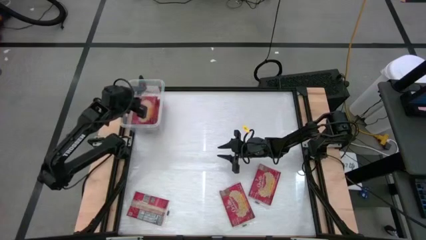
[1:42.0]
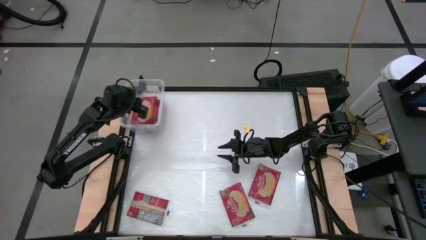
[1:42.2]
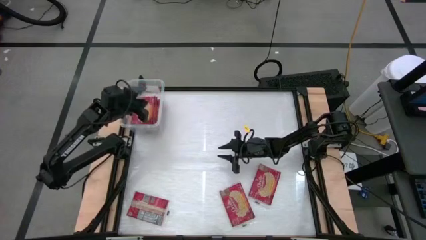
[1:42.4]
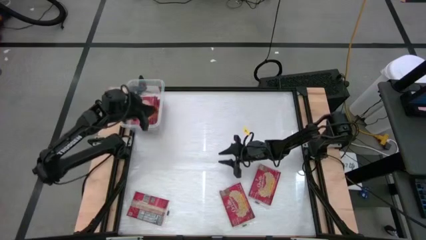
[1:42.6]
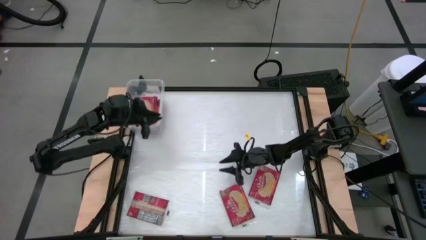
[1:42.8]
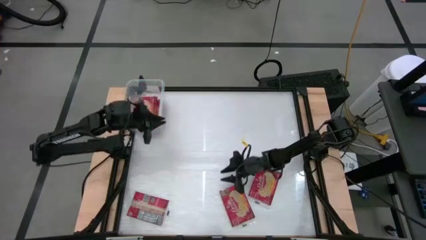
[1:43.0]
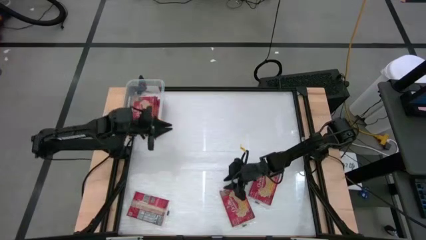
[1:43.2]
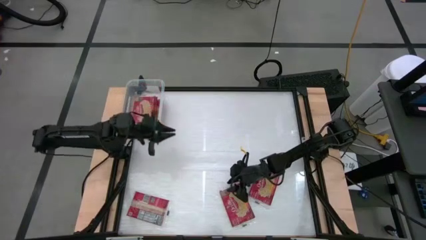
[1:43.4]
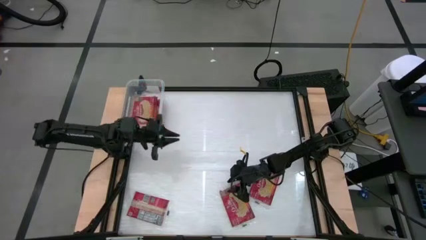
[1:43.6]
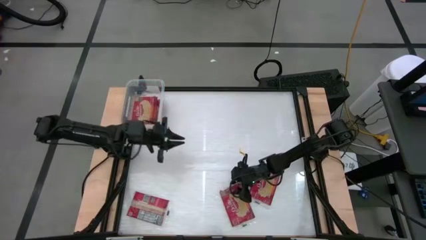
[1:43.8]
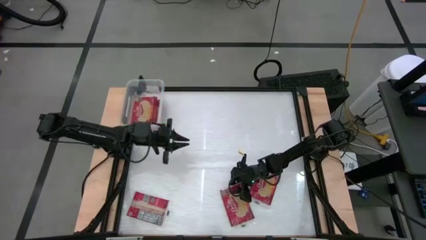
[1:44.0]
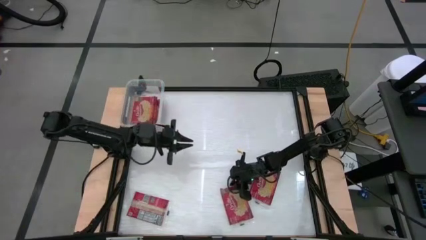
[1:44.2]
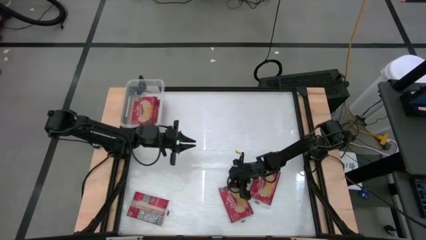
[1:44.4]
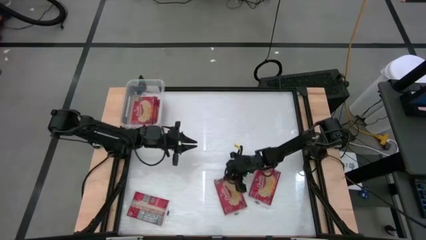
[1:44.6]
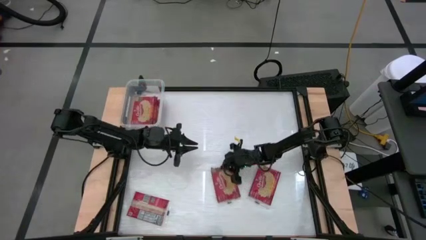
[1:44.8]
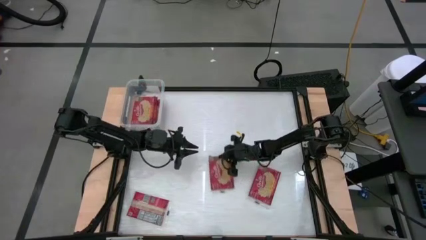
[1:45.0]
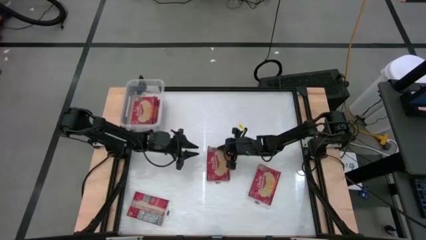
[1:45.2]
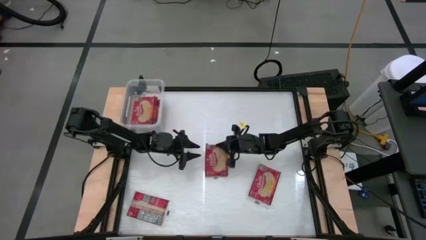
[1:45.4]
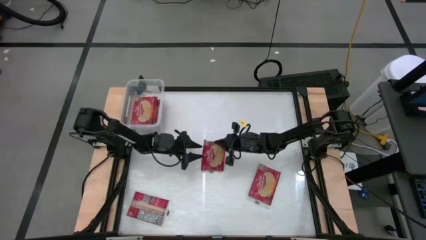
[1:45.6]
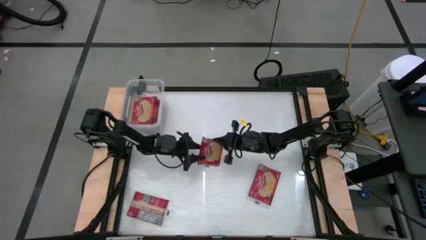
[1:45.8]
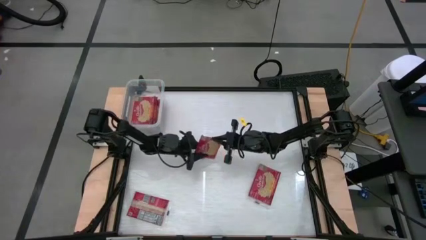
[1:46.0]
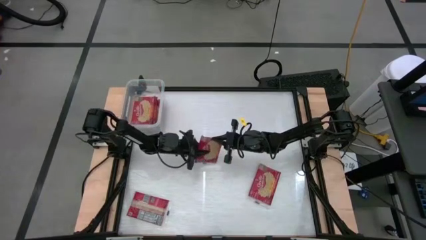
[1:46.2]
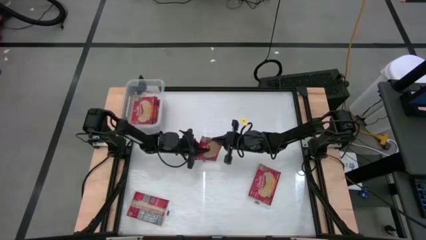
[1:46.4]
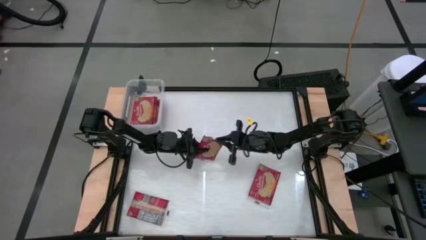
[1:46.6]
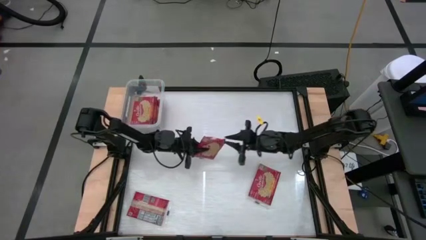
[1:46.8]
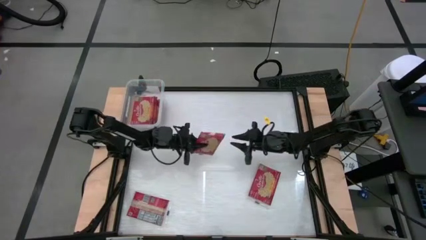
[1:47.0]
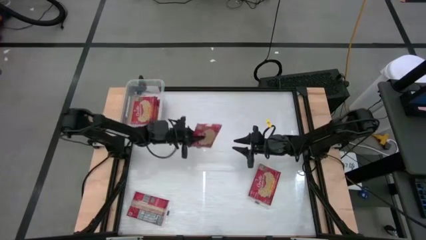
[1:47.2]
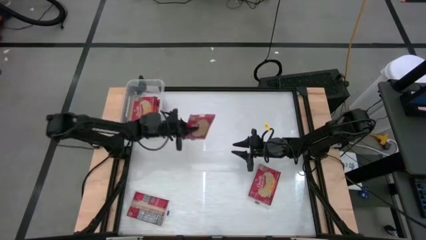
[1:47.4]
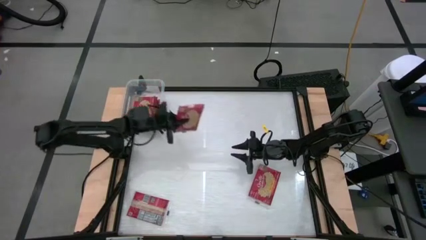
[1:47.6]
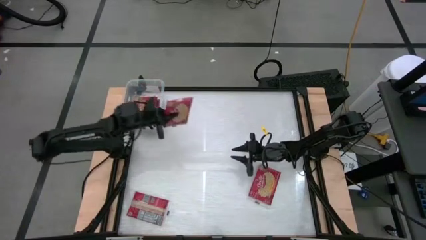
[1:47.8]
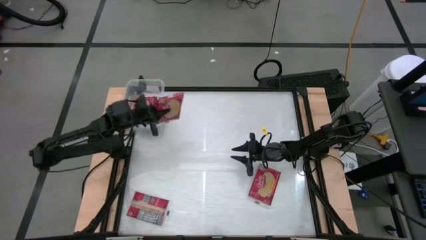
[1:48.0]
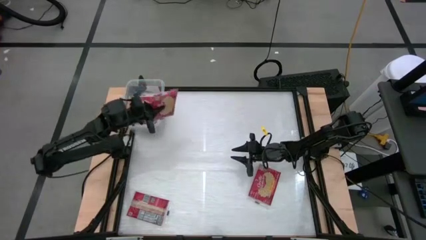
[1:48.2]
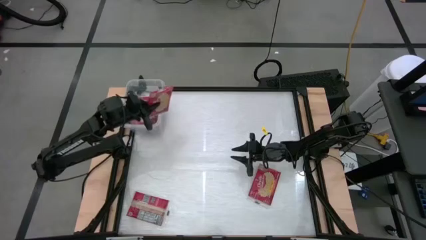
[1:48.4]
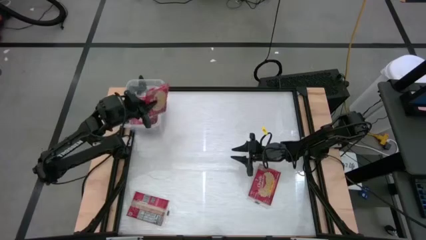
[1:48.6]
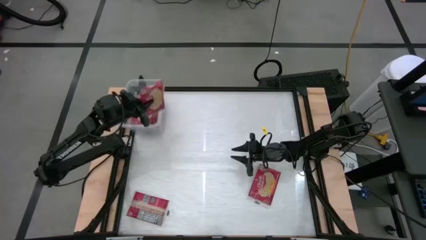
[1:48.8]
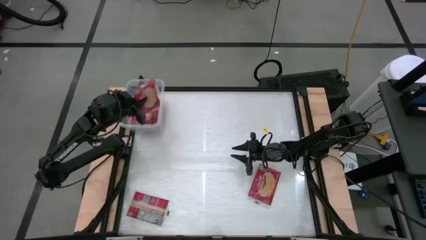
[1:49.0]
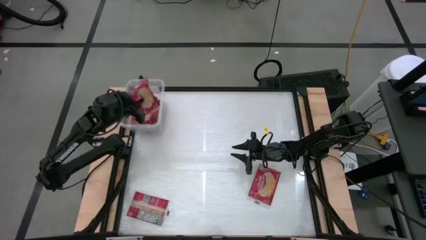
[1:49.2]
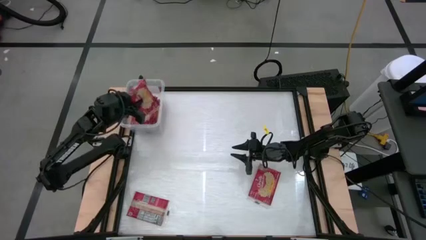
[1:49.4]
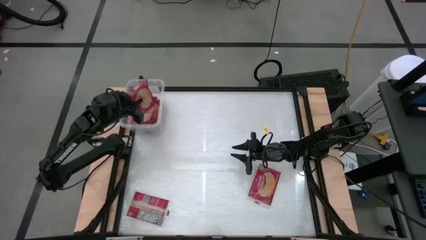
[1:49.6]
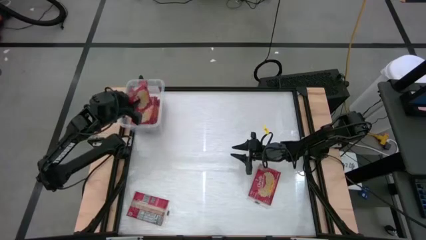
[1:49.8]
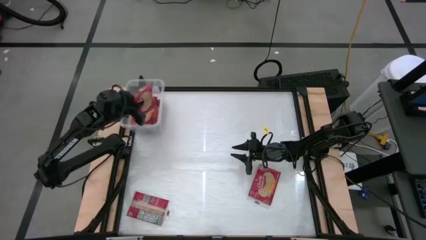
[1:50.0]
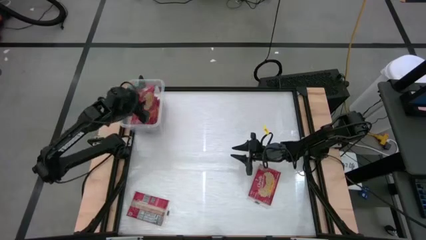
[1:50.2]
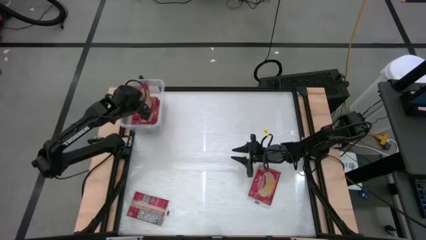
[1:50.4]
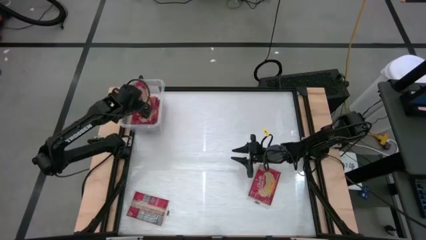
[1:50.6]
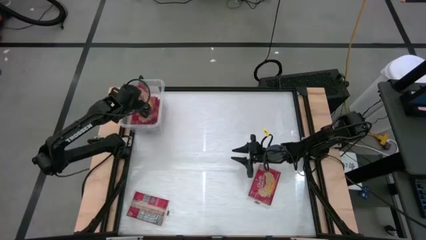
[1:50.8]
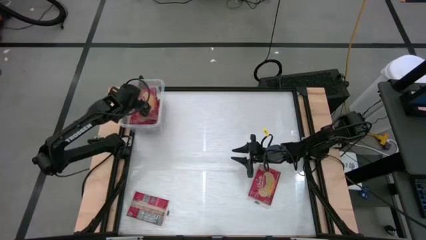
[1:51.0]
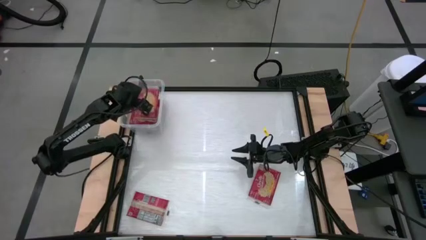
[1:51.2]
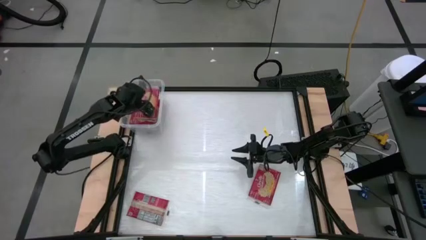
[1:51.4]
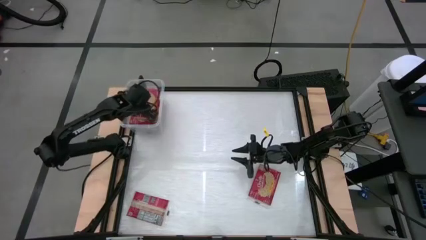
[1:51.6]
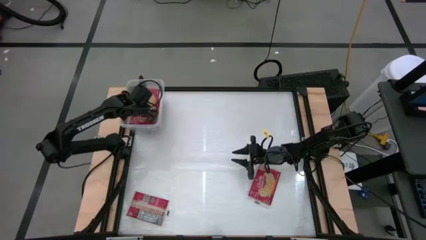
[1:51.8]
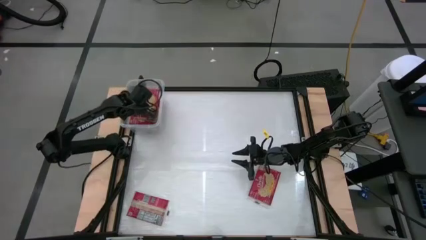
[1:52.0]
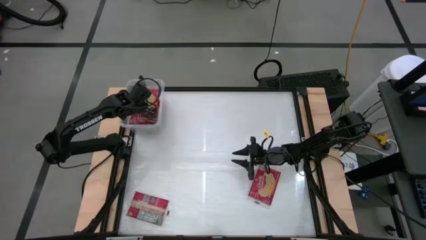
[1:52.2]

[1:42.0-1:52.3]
Task: Sort popcorn bags into baskets
Stack the red popcorn pack into the bin

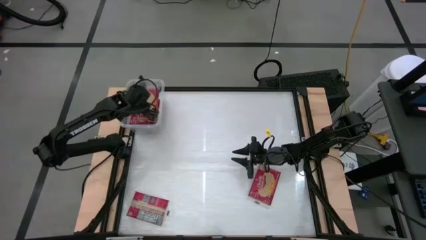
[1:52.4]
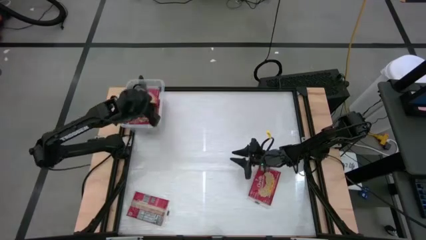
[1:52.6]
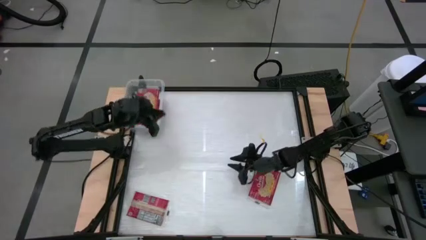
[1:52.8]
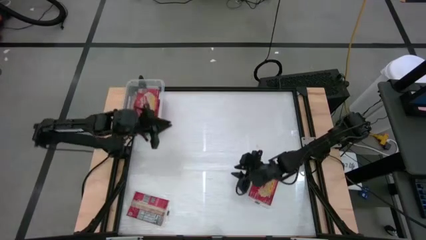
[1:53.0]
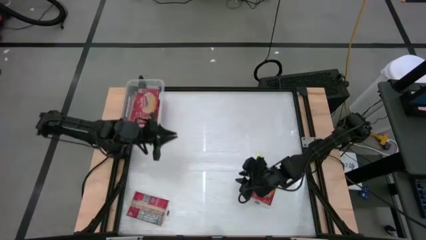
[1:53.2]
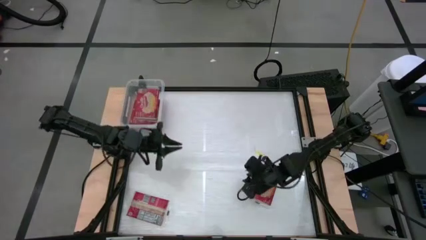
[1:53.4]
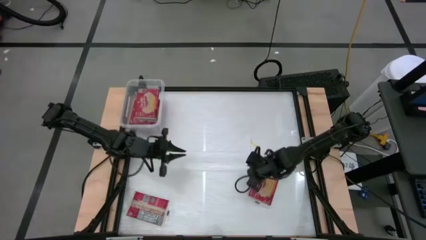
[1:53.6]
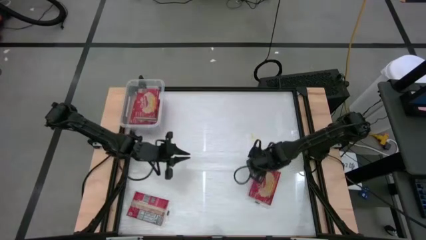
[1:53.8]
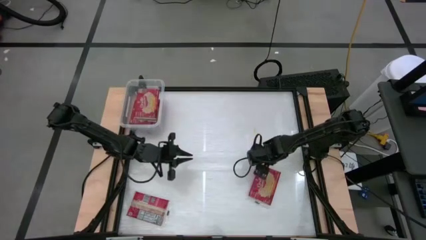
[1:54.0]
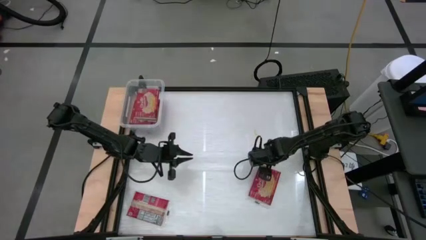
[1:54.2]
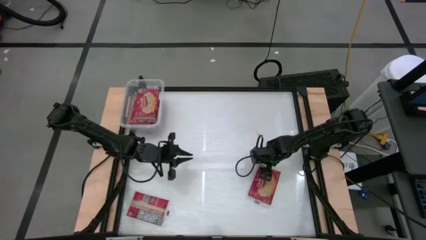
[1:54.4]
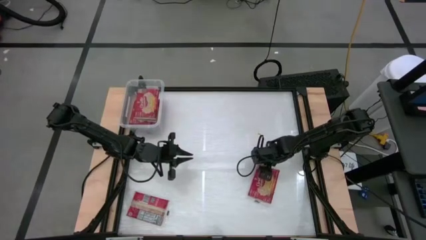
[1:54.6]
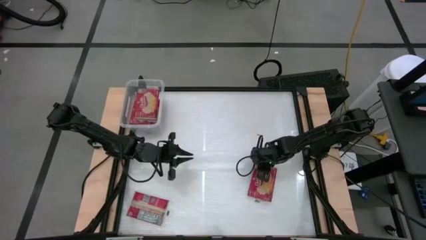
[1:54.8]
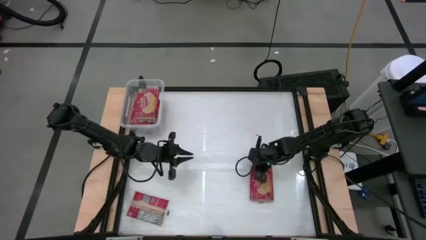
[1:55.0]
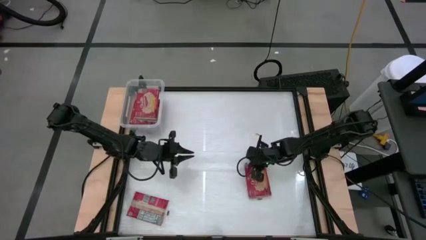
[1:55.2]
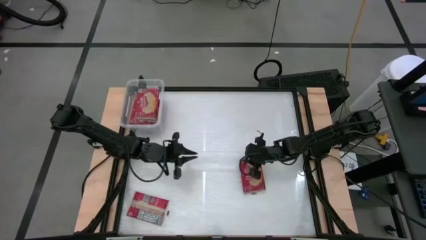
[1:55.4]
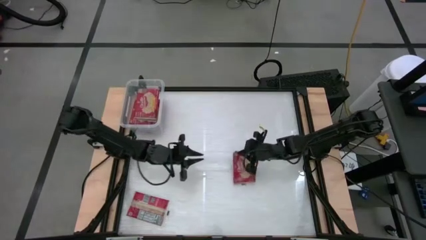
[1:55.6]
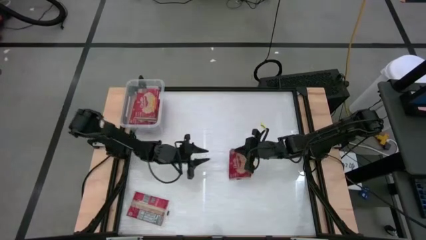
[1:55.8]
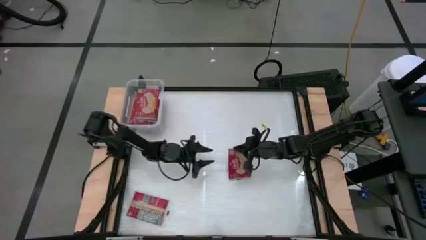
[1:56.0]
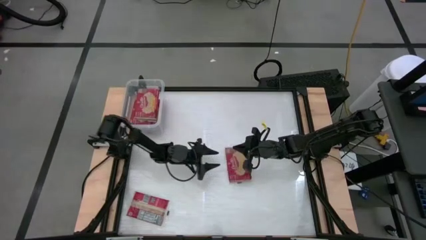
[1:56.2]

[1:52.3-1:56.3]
Stack the red popcorn pack into the bin

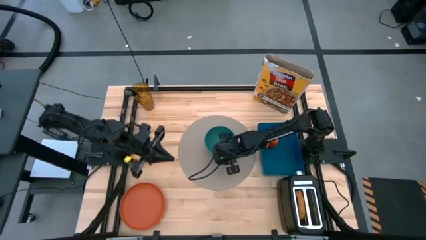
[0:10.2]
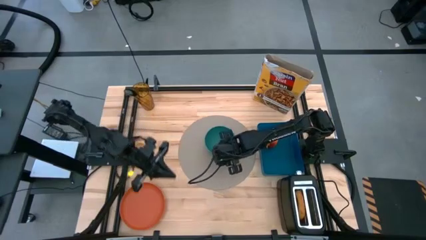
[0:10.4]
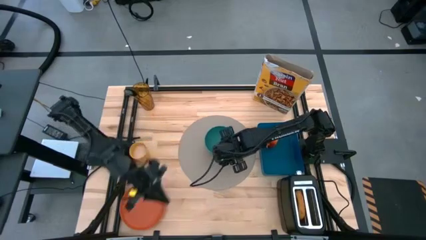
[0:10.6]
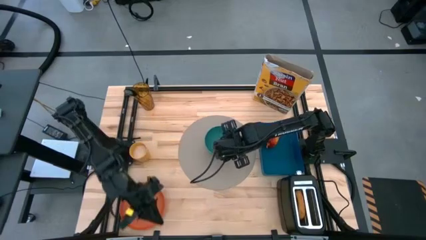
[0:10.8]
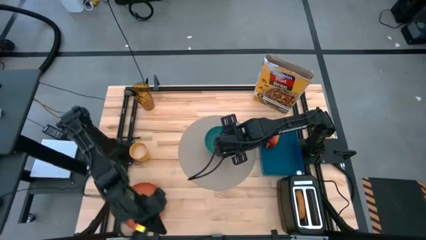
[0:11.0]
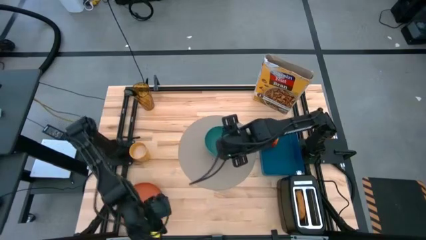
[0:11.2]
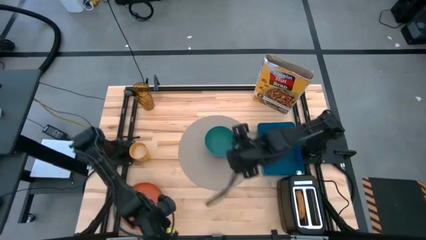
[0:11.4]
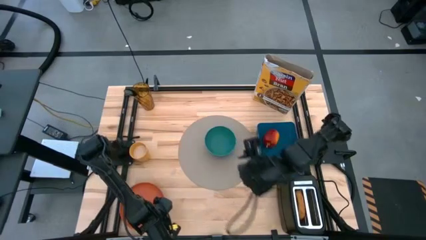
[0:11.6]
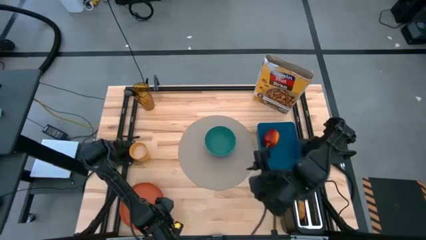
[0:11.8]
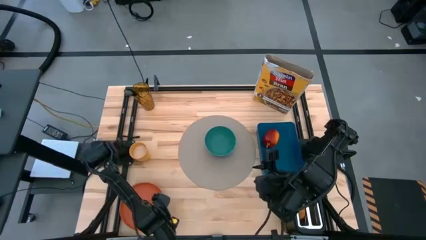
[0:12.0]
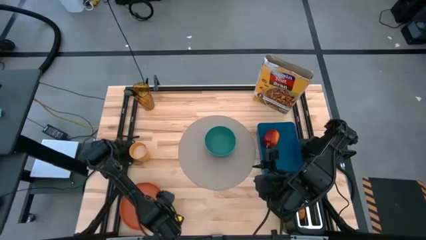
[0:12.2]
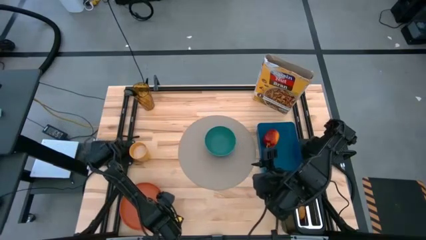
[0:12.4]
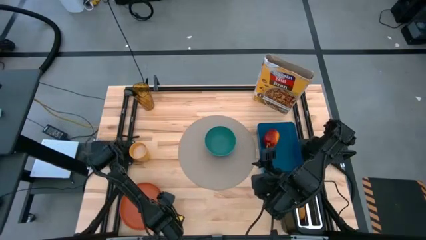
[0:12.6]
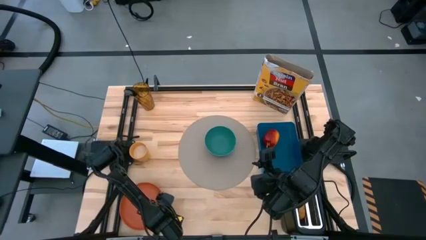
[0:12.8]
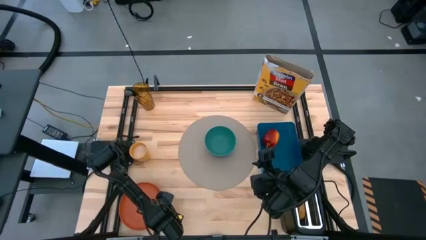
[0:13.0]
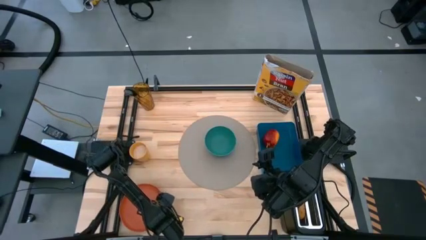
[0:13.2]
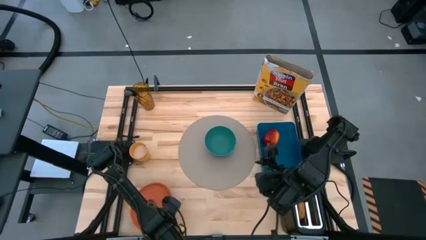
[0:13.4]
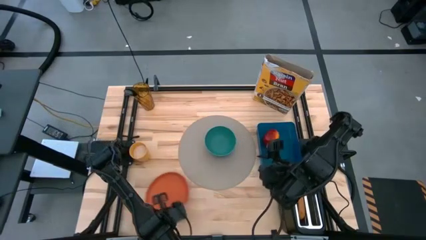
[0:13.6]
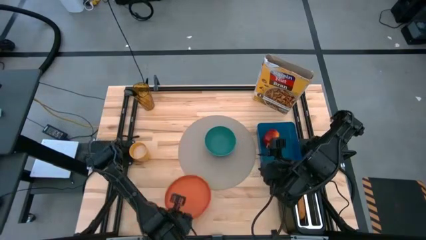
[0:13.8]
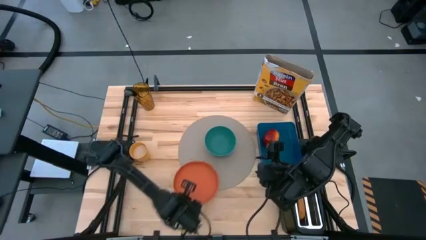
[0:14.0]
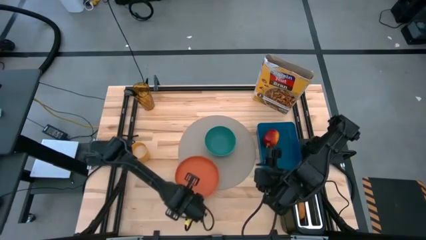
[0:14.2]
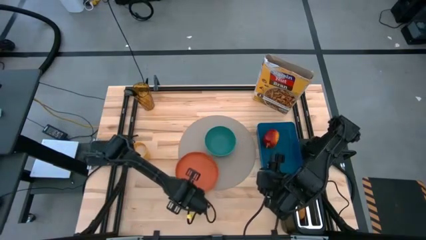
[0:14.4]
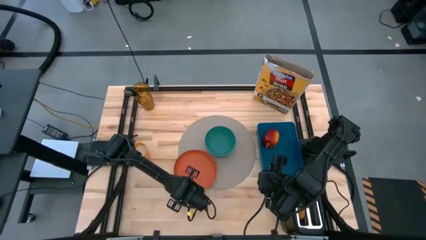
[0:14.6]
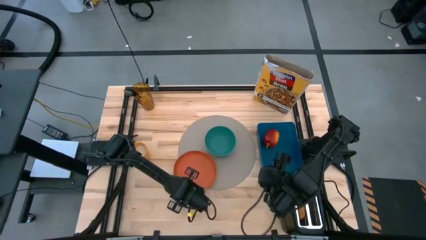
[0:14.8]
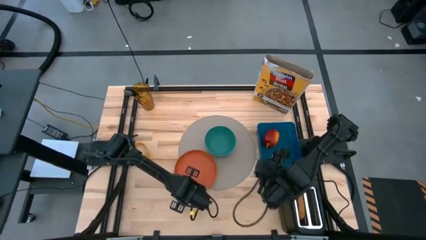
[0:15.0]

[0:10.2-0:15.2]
Task: Arrange a breakfast setting
Put the orange plate in the bottom left of the brown table mat
